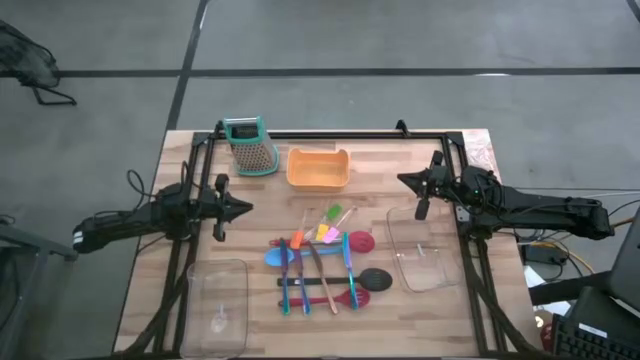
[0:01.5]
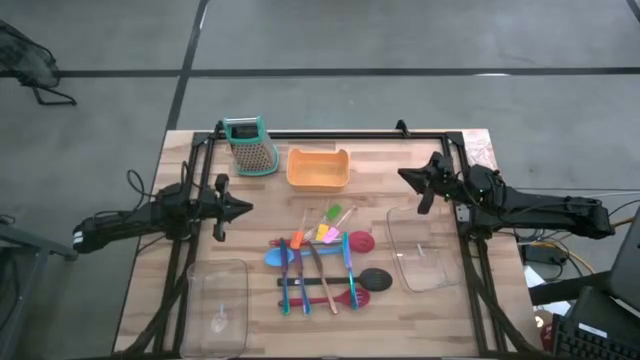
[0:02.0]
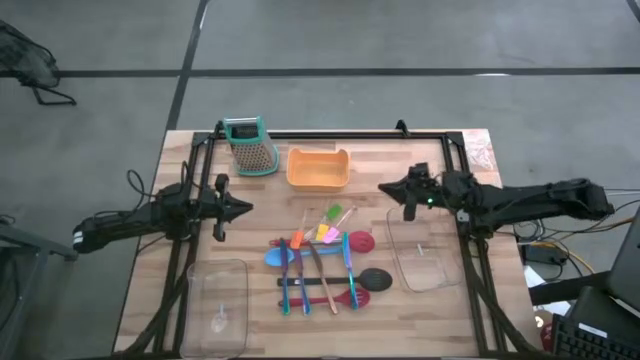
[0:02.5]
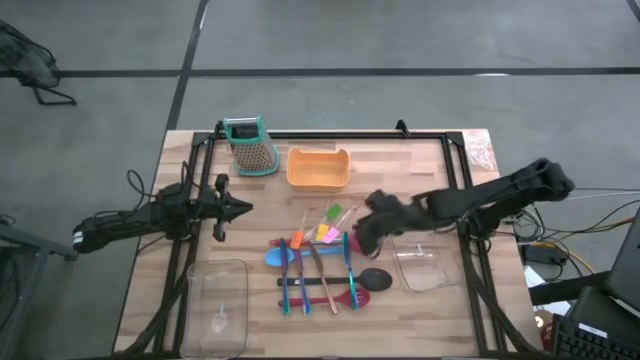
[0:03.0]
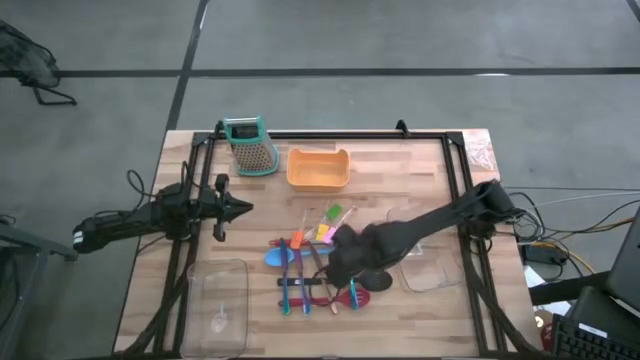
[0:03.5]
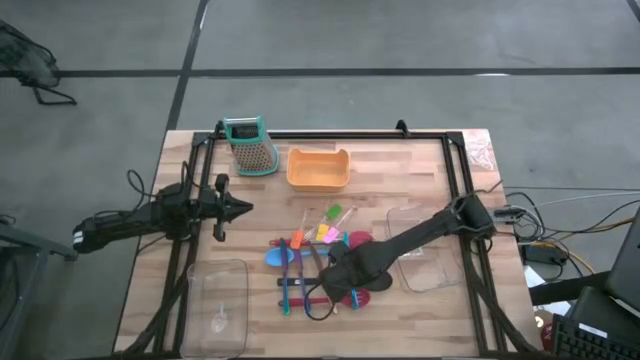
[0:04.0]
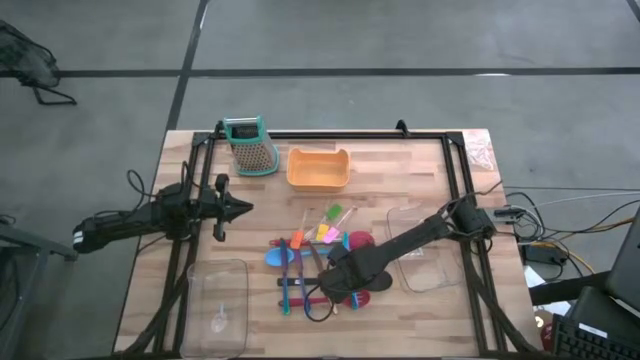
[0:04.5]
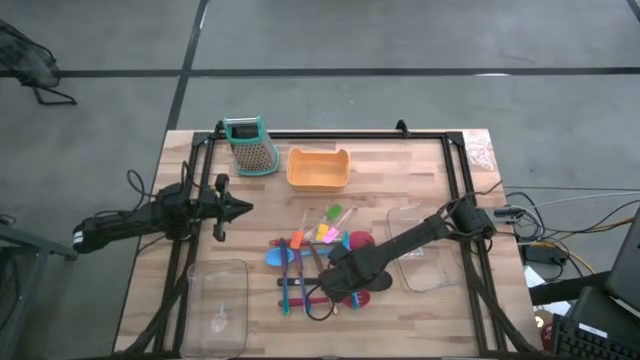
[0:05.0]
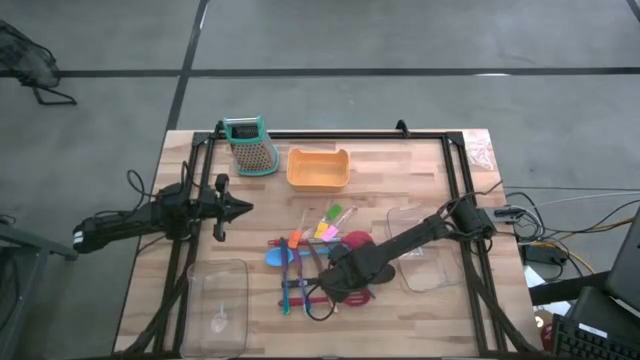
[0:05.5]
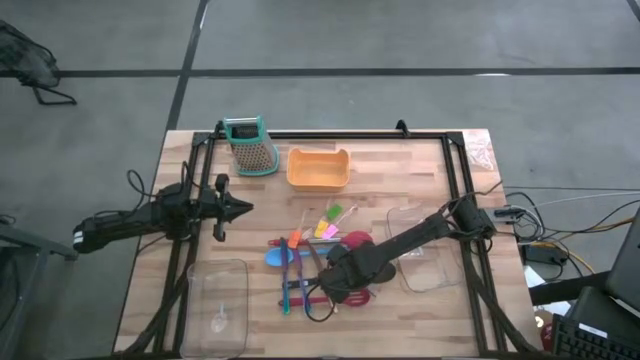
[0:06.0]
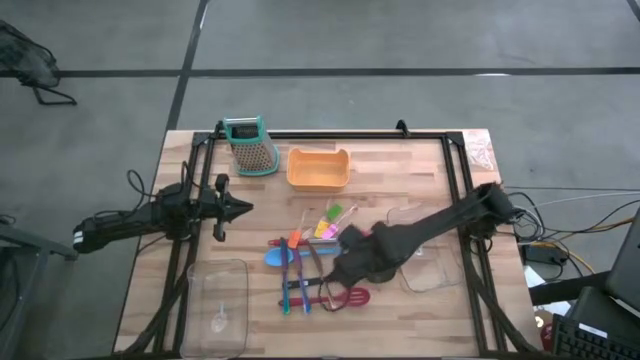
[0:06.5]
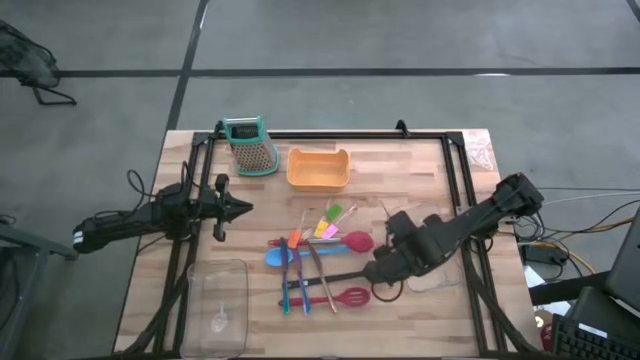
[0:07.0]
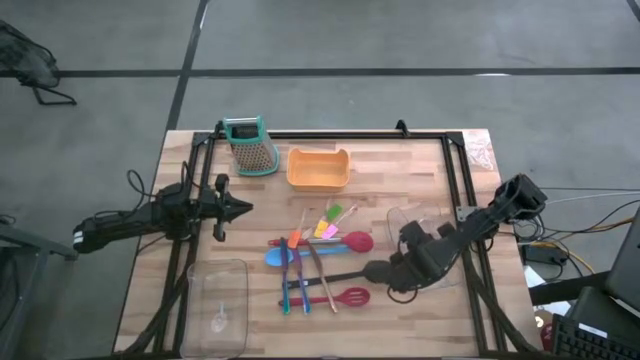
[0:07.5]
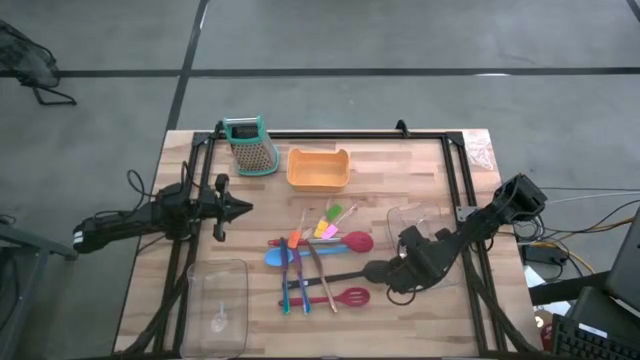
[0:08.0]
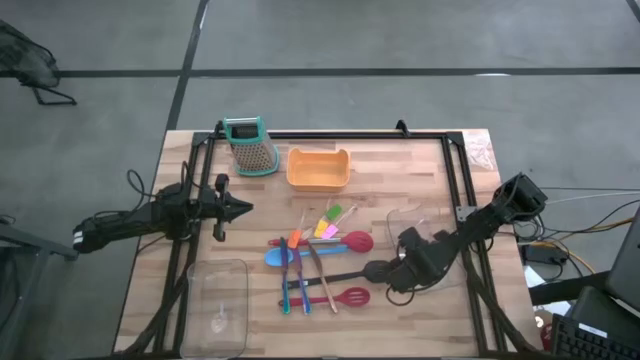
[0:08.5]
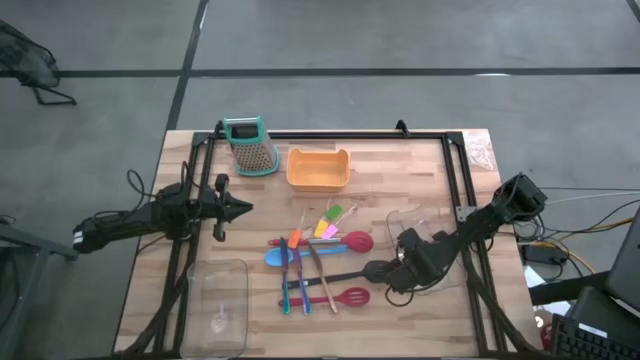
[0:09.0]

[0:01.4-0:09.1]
Task: Pick & Place Kitchen Items
Put the blue knife into the top transparent bin

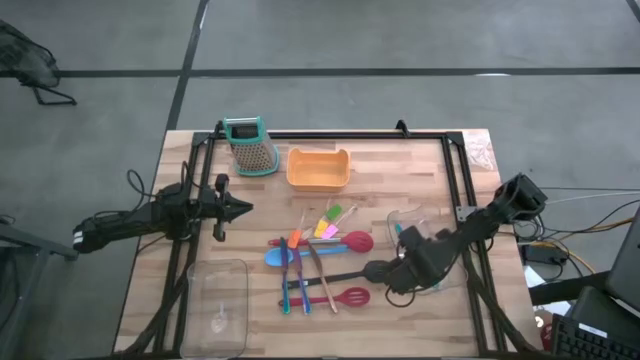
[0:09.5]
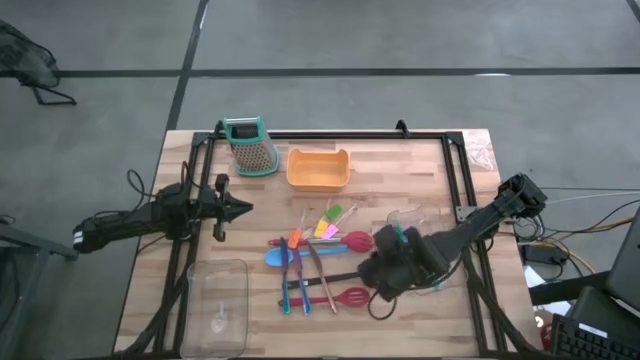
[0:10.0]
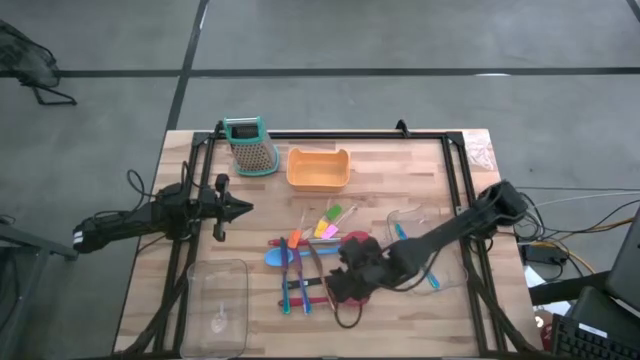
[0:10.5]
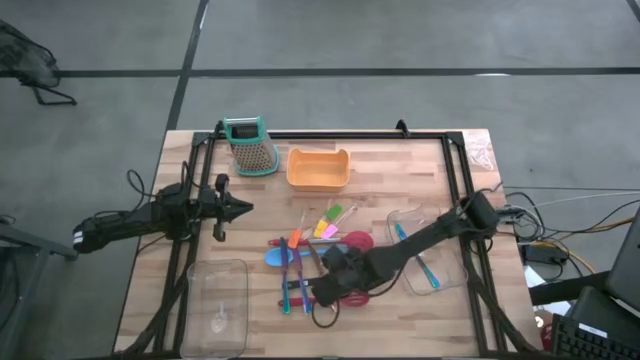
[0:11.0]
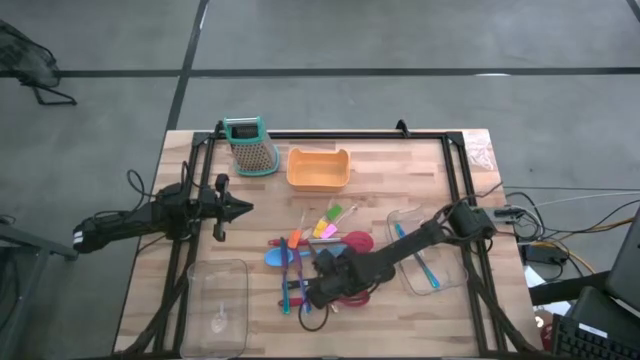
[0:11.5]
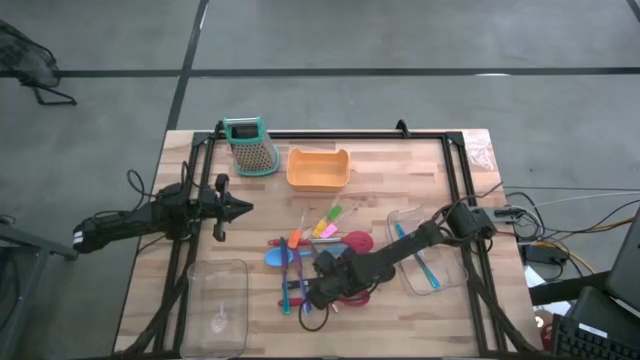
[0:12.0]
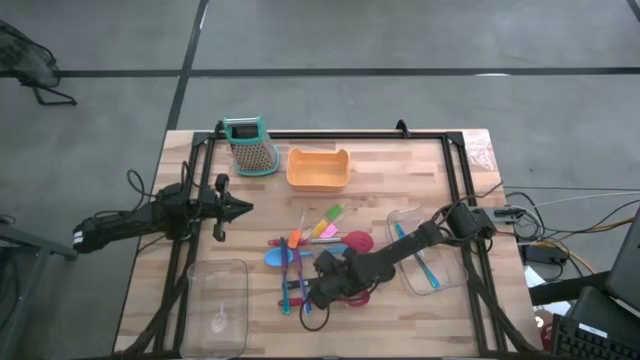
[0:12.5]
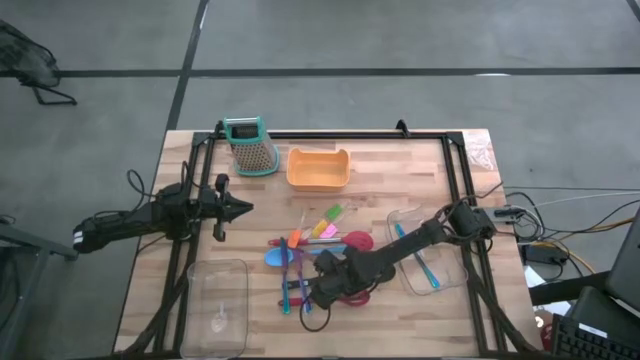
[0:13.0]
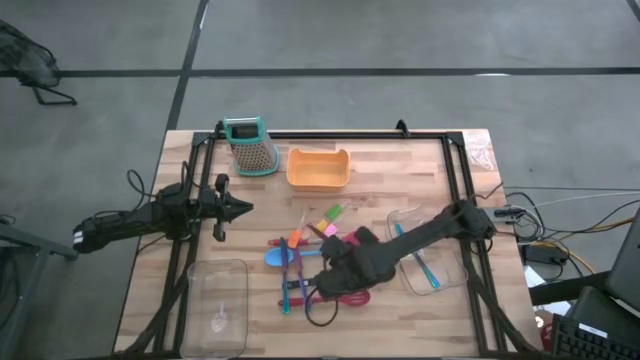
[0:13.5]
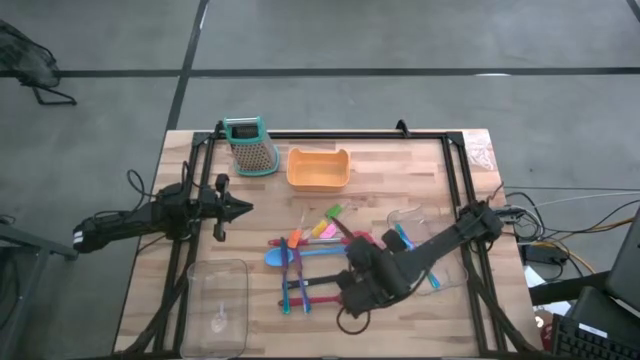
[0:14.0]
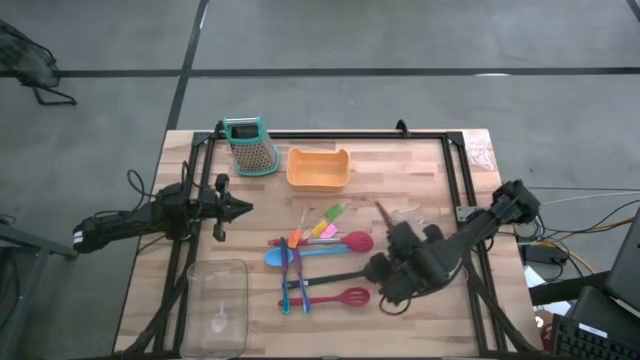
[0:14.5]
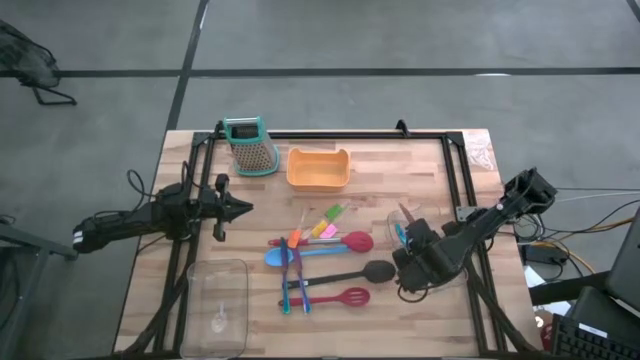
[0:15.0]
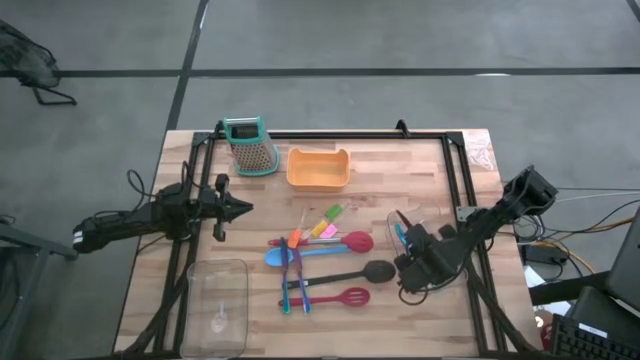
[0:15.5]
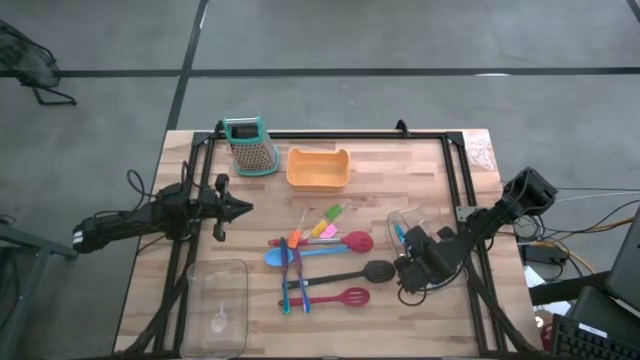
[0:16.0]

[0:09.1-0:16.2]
Put the gold knife into the top transparent bin

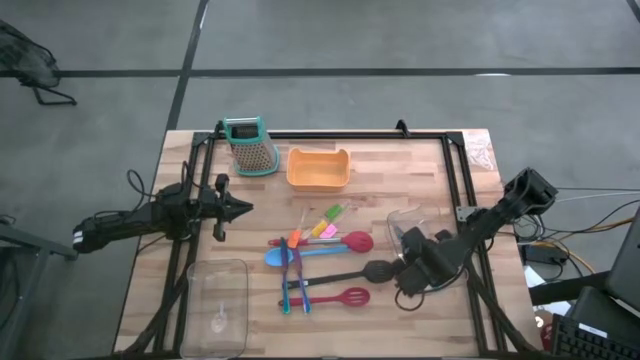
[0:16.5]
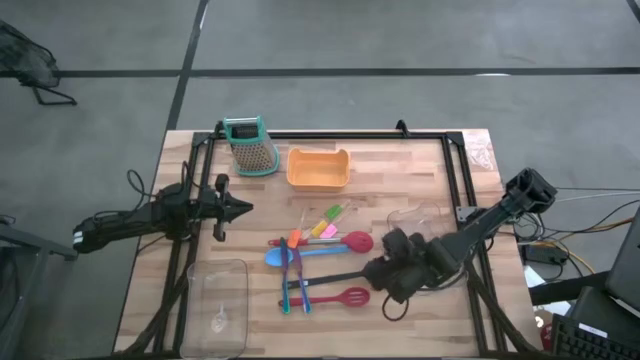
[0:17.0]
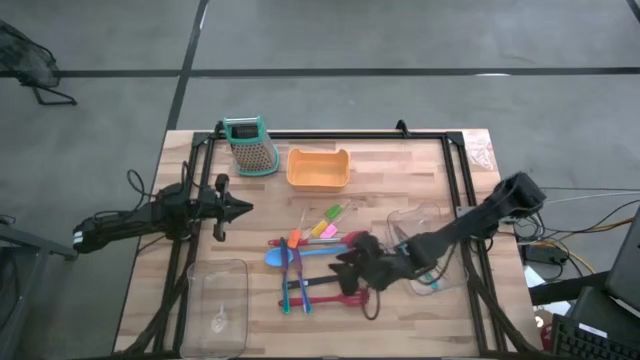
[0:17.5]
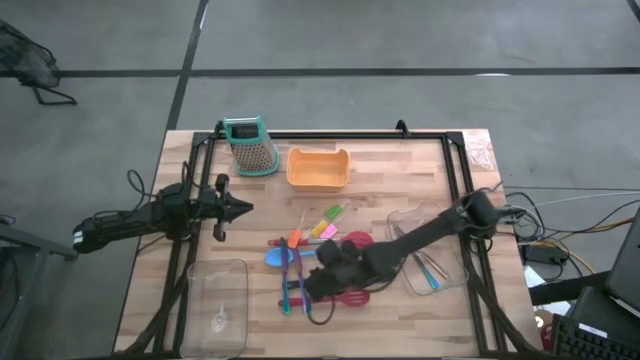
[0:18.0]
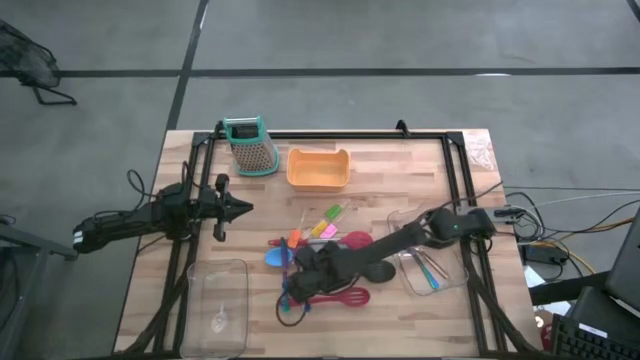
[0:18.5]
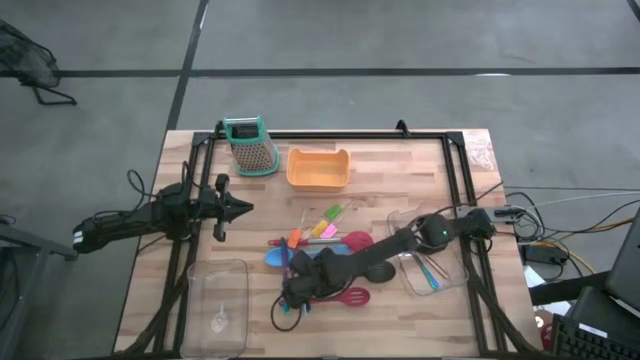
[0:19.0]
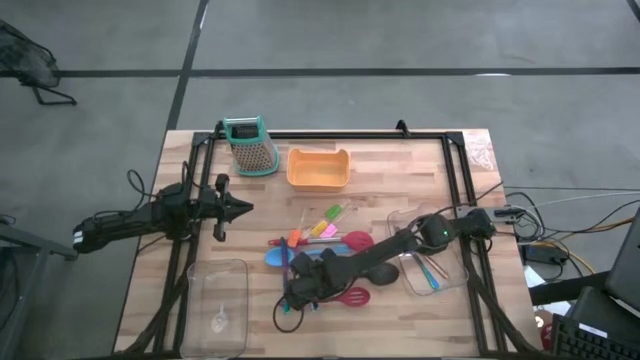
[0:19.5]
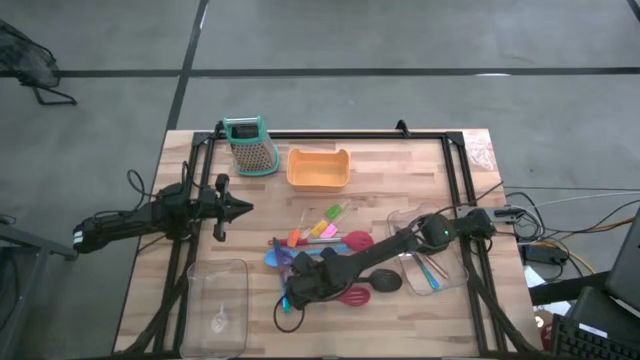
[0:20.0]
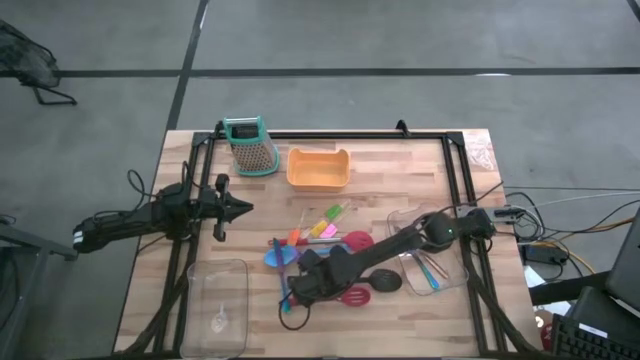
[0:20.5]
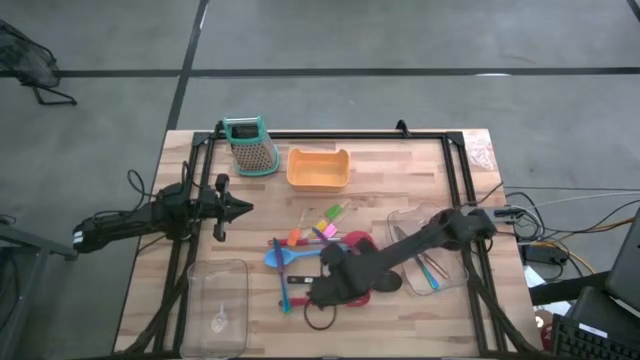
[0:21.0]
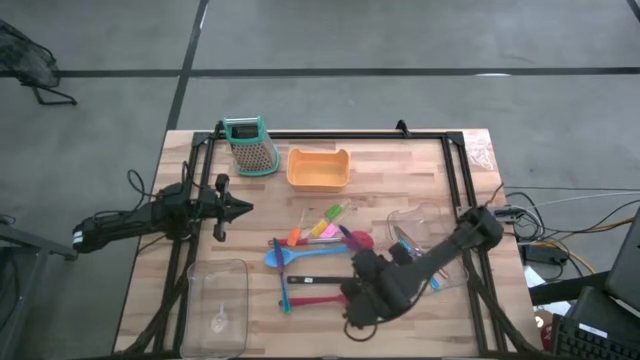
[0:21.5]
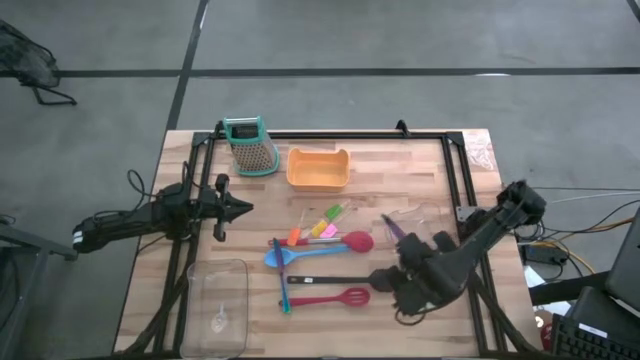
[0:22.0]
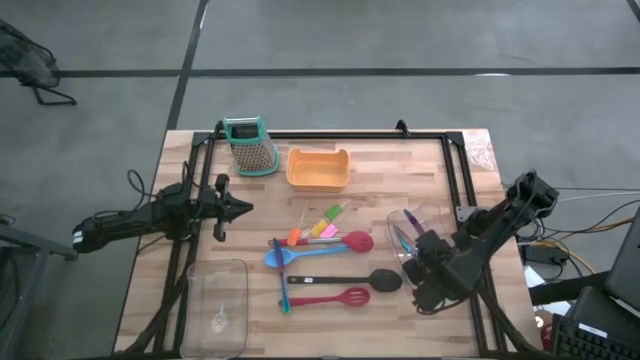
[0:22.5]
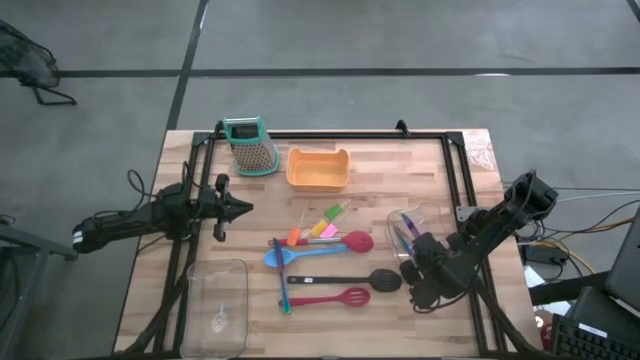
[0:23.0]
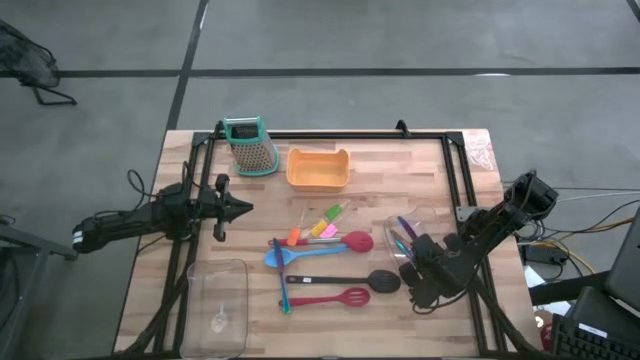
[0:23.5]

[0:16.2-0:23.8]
Put the blue knife into the top transparent bin
